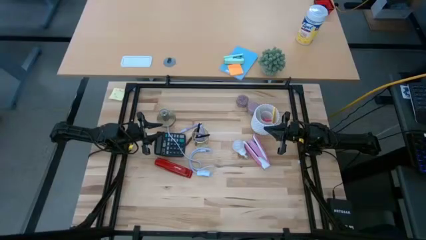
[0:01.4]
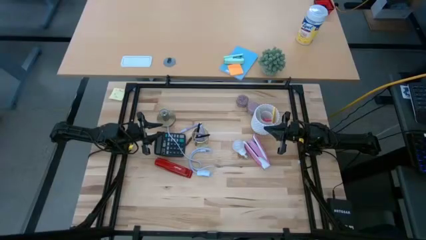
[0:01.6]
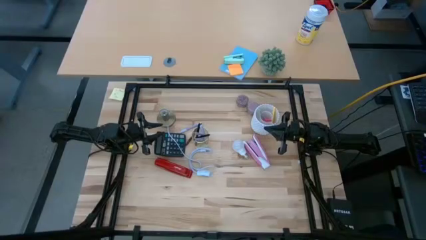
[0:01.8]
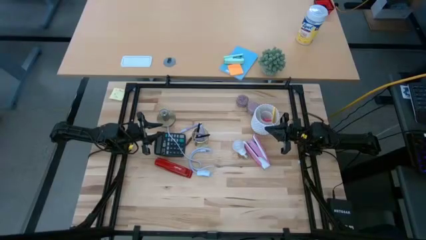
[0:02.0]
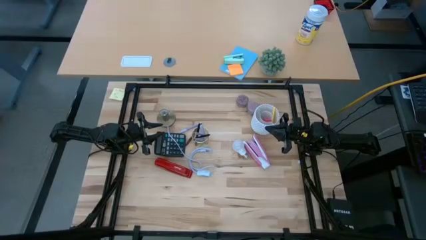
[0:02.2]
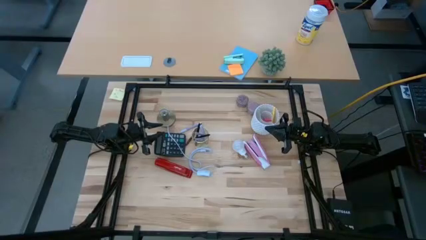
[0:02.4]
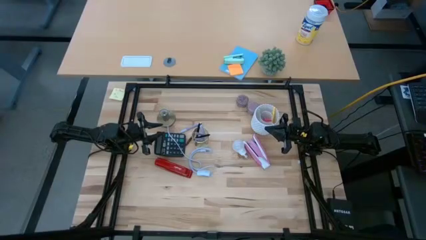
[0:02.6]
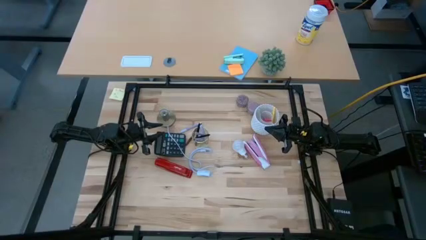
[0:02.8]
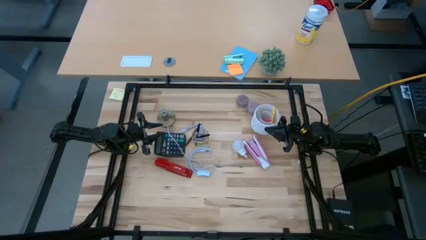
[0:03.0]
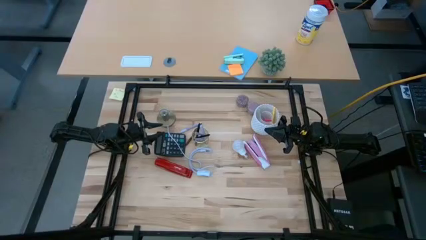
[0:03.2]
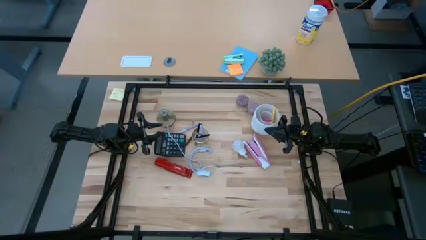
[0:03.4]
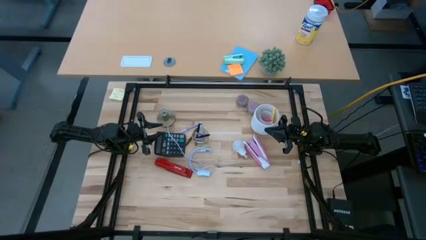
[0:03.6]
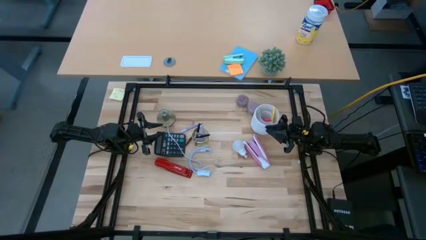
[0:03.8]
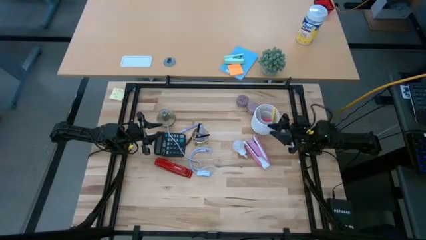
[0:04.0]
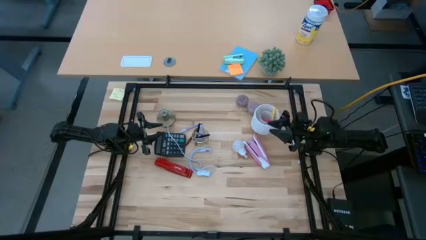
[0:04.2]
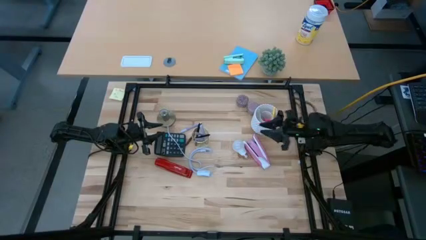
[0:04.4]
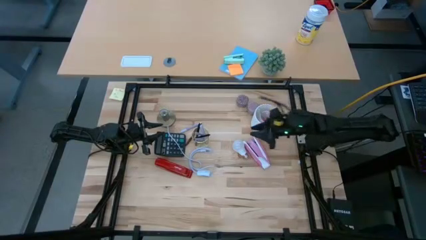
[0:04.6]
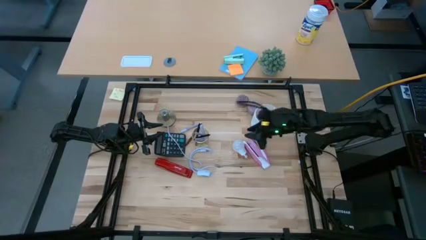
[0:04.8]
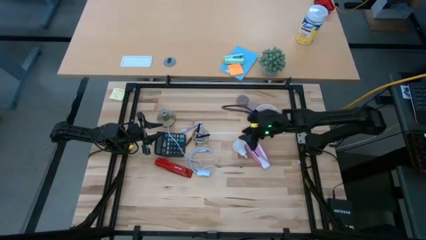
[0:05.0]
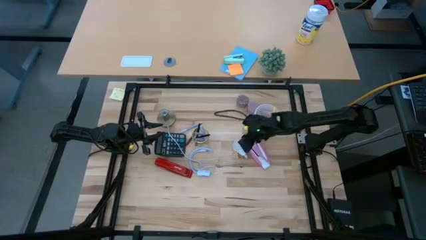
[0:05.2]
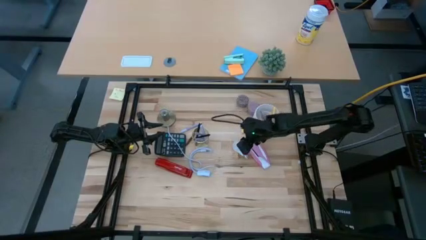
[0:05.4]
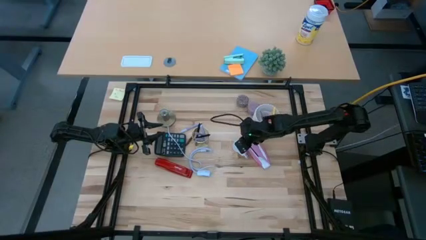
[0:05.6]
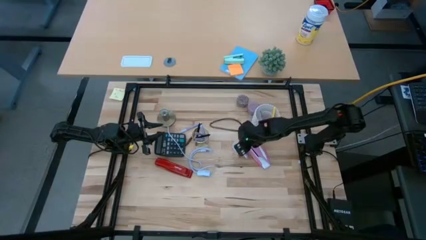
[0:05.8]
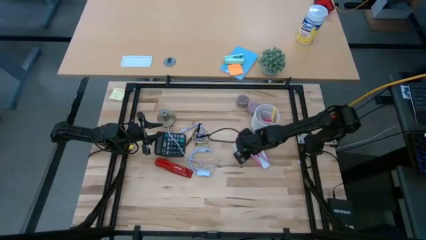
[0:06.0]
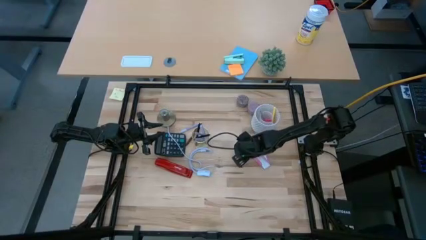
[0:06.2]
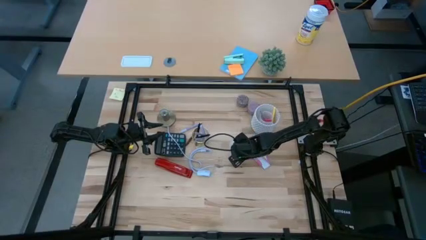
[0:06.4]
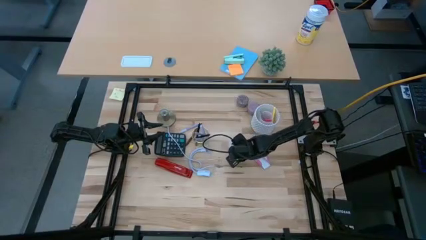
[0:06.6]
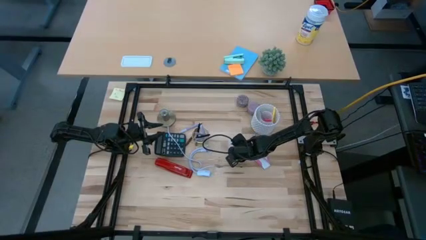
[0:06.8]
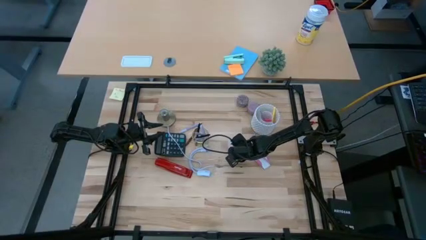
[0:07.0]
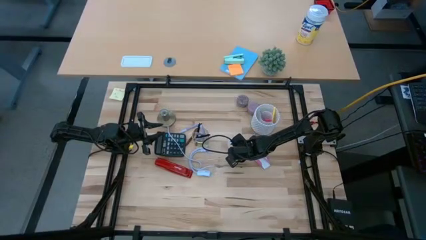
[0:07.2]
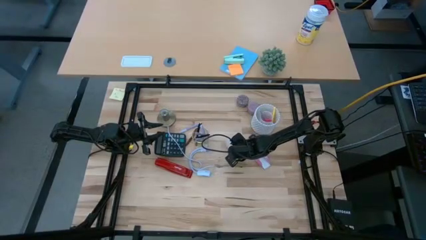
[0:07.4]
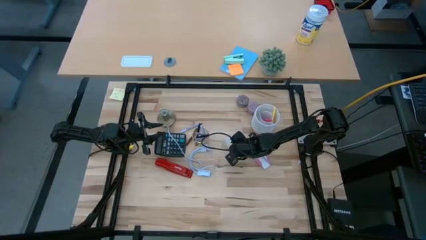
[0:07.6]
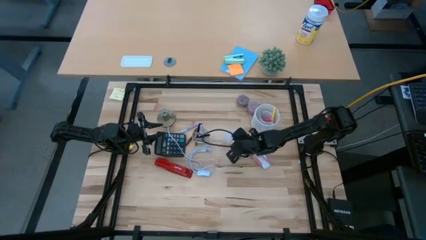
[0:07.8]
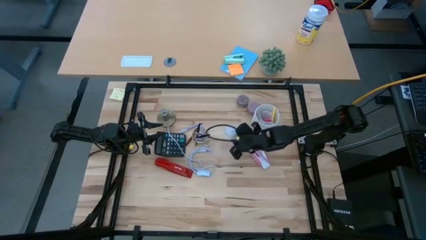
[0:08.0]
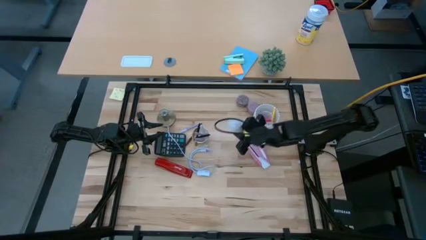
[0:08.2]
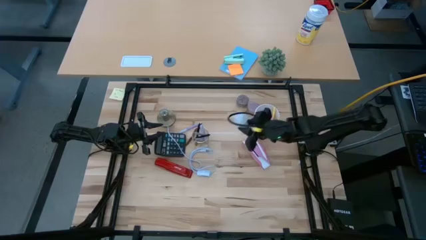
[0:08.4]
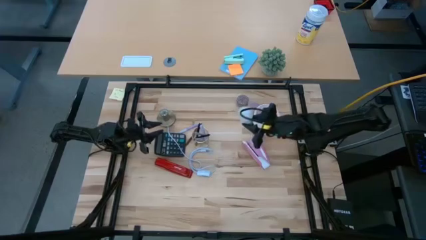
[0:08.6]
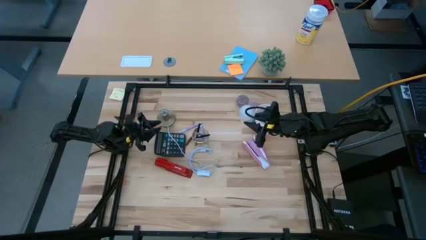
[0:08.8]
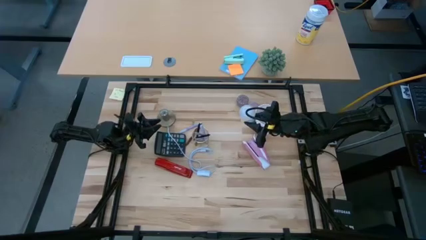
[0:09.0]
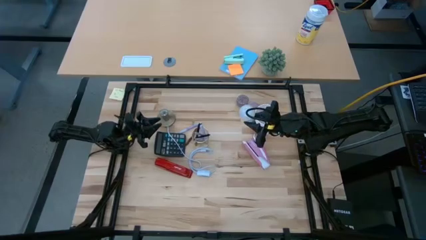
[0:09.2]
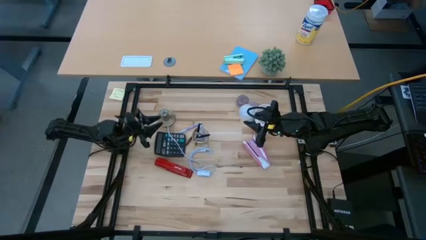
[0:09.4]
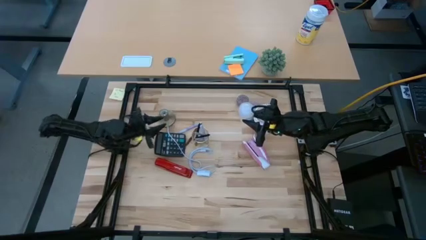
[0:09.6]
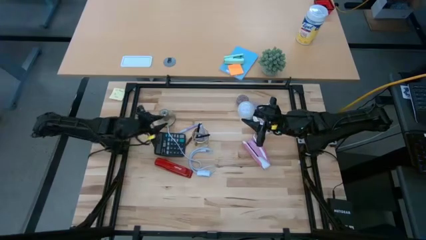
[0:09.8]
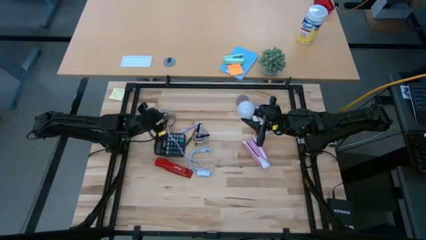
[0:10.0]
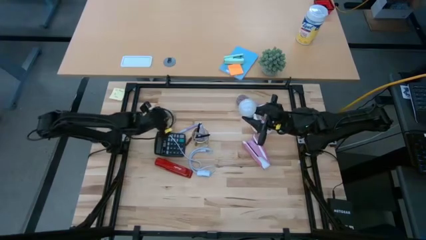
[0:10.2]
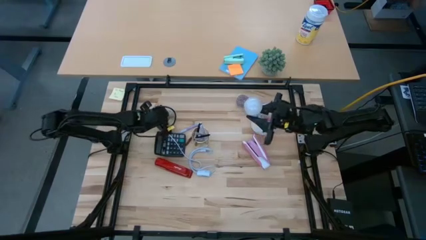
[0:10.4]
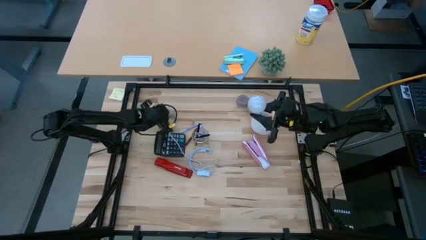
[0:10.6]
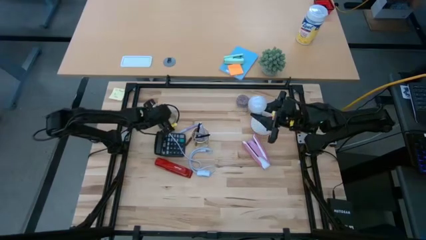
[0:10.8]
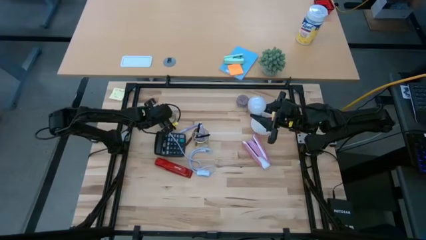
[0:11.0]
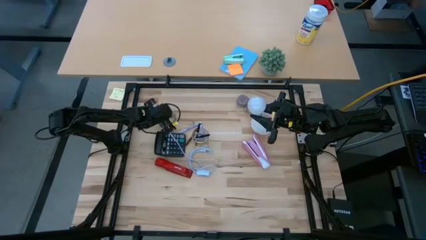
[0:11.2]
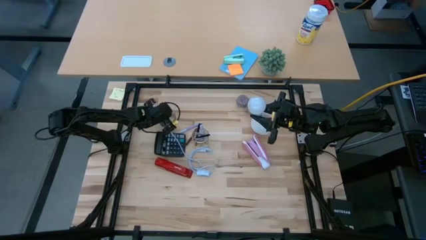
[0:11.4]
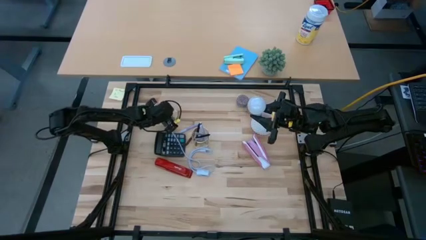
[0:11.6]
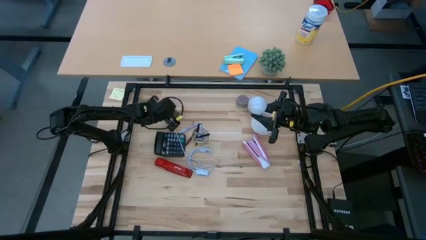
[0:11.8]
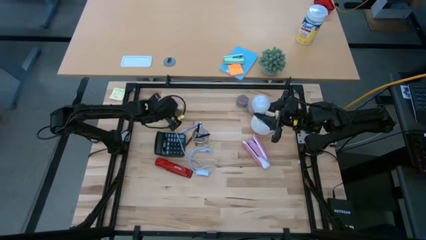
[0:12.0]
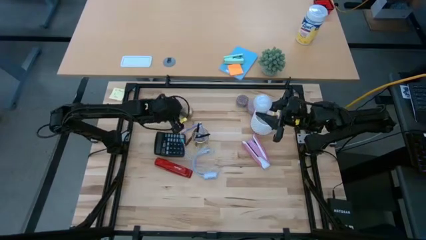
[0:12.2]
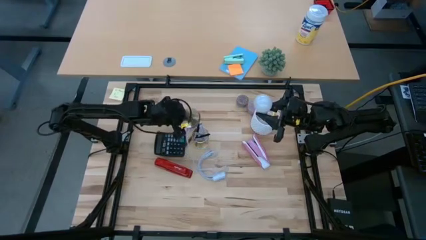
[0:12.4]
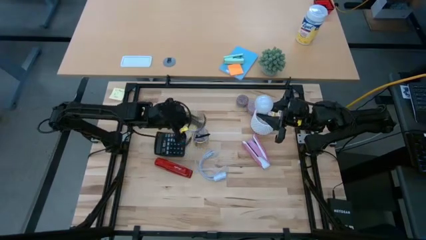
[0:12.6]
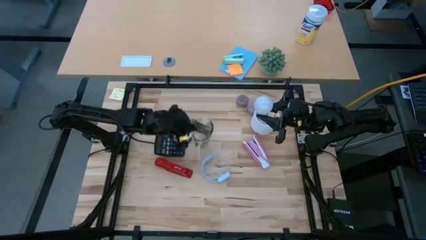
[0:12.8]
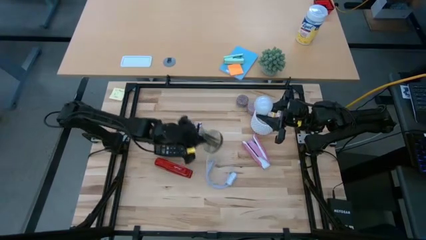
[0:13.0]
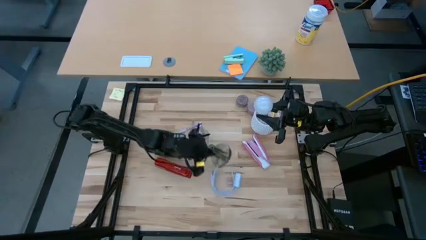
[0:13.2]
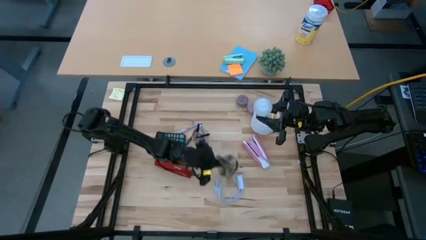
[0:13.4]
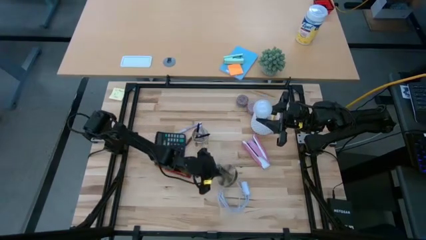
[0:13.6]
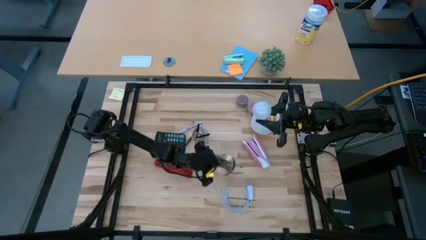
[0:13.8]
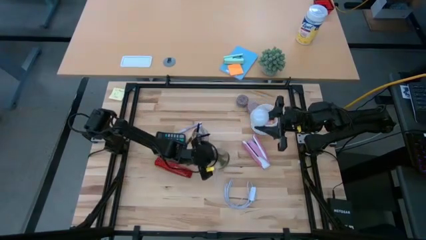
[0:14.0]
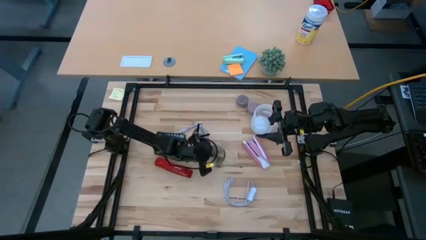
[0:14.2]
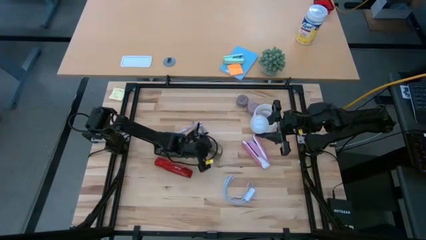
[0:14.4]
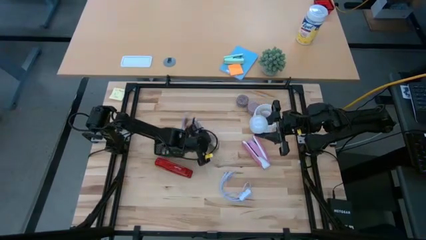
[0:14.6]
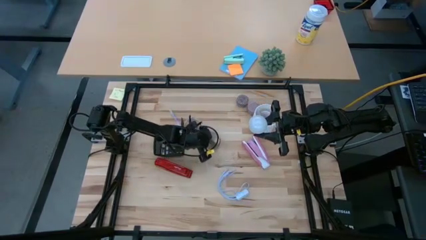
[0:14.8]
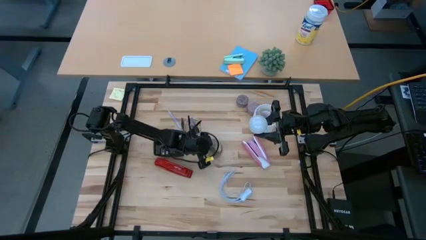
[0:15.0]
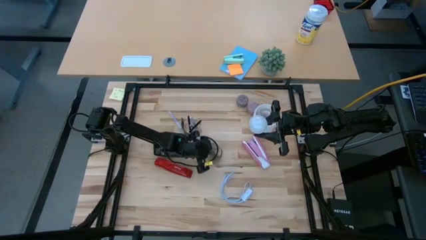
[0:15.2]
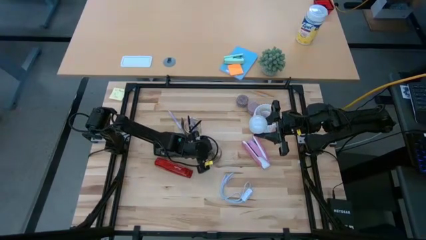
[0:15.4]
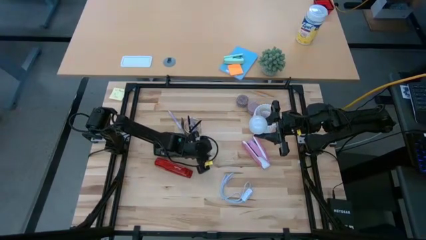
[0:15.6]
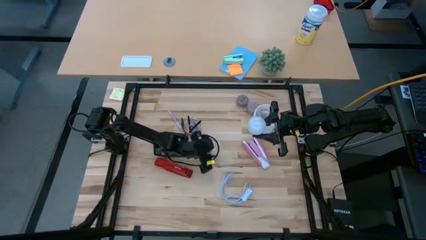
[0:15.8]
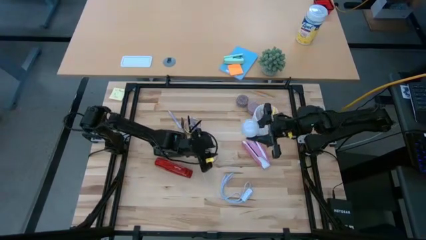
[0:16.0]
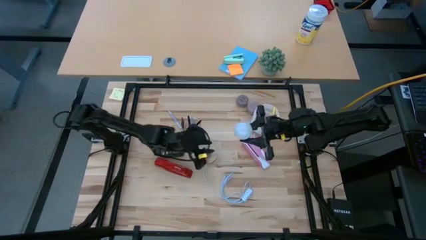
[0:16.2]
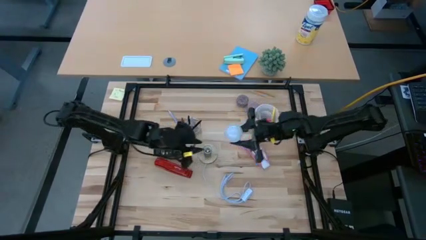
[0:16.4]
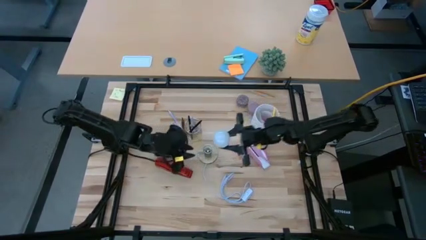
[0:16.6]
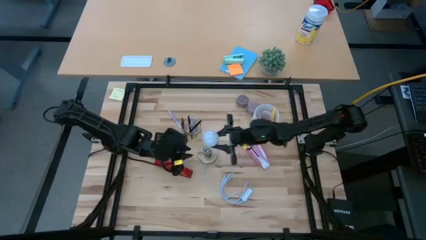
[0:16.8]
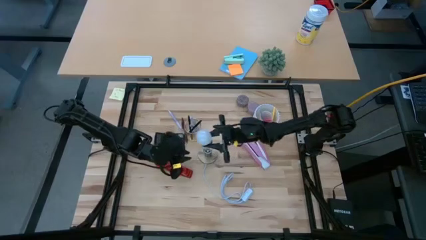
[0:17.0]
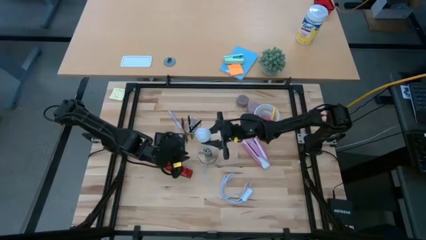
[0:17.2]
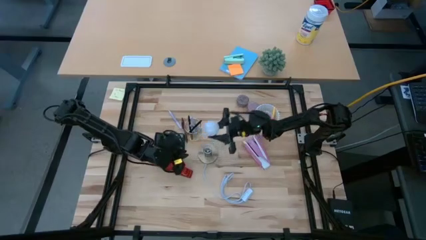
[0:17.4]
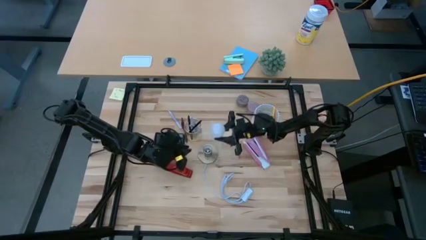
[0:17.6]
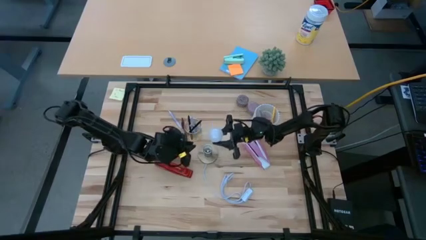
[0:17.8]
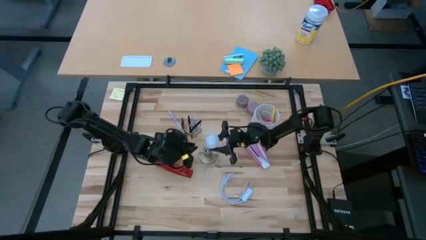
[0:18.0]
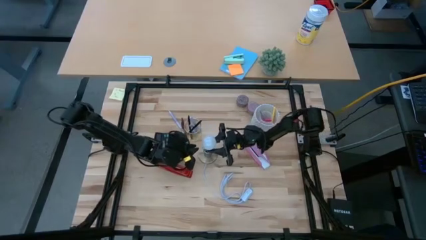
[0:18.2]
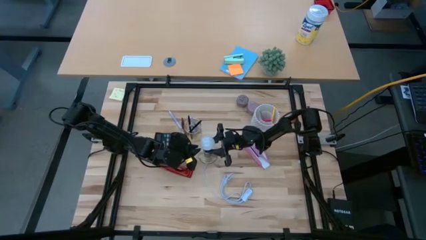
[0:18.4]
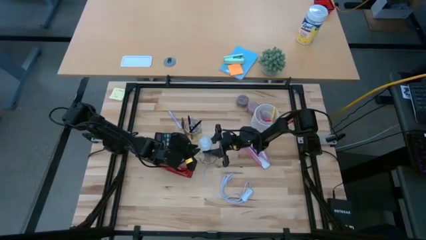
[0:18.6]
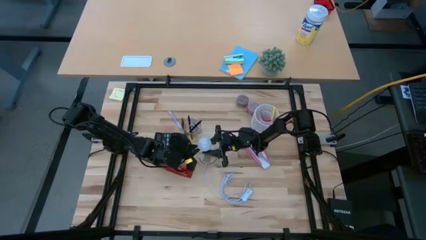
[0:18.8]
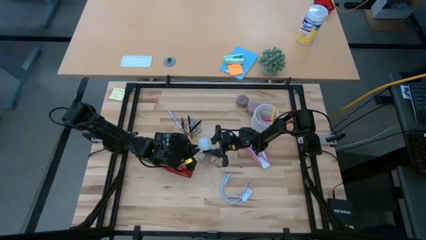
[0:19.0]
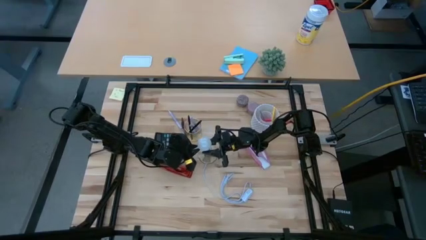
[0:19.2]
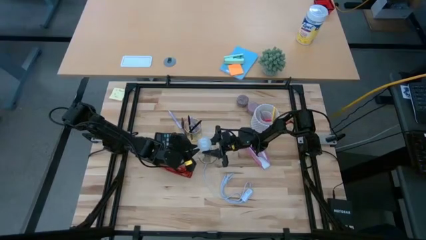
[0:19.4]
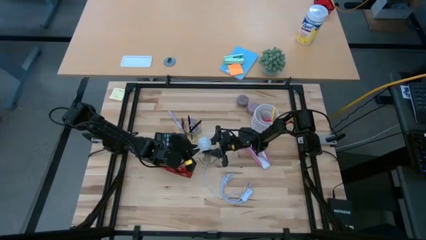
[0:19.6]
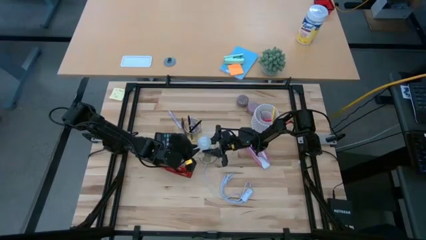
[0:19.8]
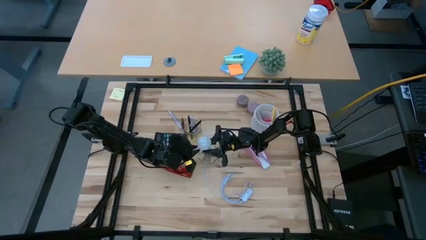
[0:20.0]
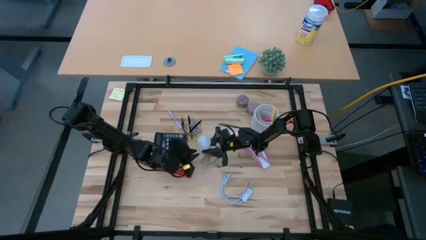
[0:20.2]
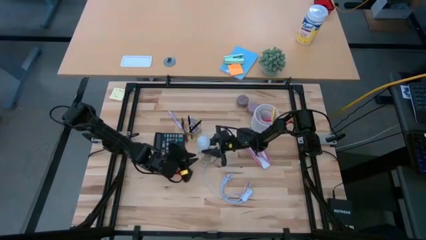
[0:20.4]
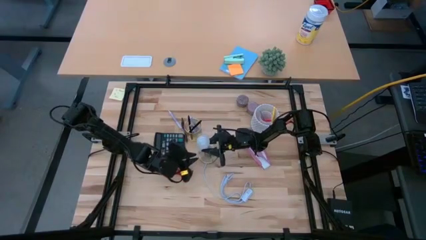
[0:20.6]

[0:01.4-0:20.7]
Task: Screw lightbulb
Insert the white lightbulb into the gold lamp
